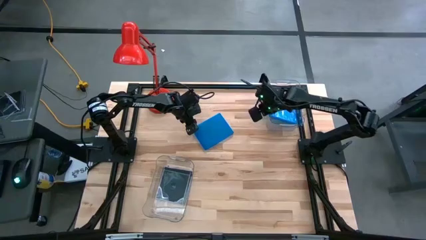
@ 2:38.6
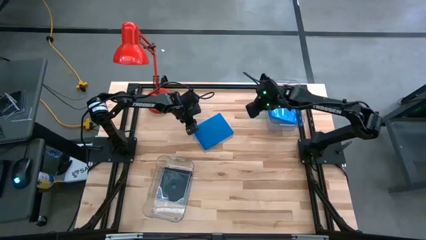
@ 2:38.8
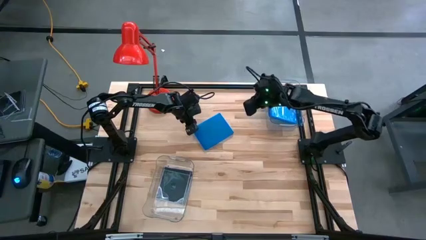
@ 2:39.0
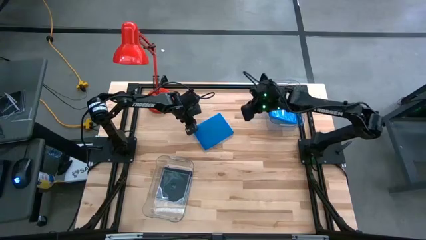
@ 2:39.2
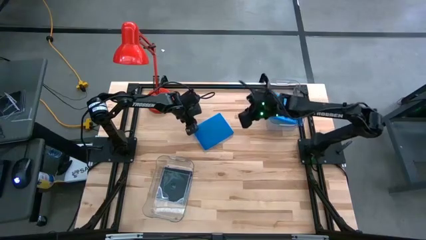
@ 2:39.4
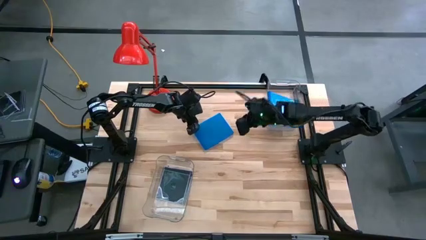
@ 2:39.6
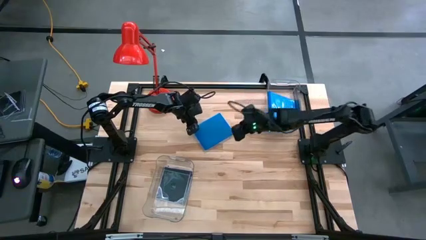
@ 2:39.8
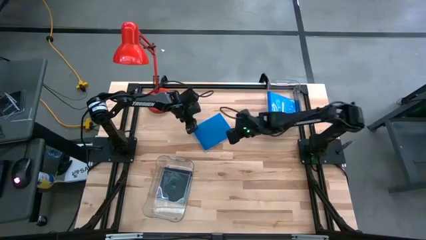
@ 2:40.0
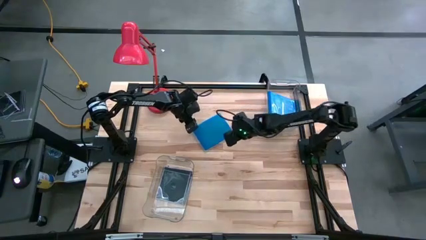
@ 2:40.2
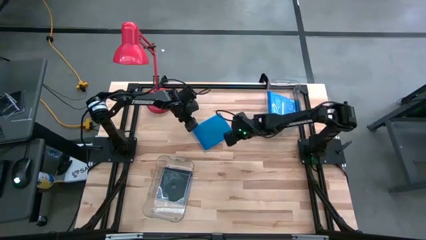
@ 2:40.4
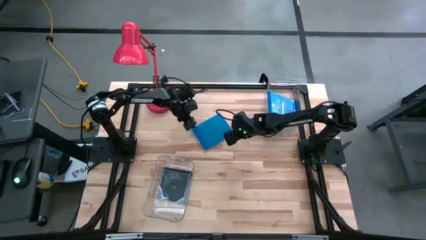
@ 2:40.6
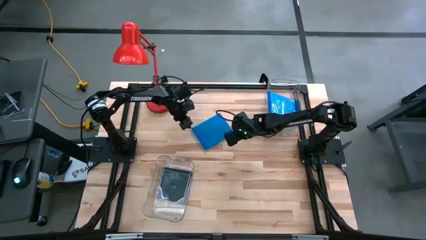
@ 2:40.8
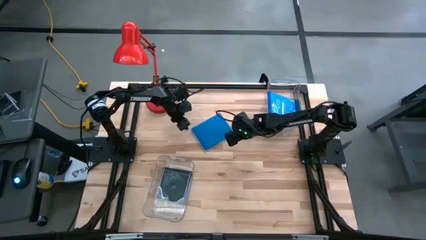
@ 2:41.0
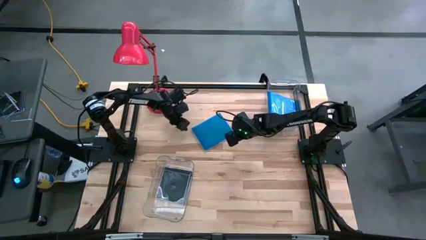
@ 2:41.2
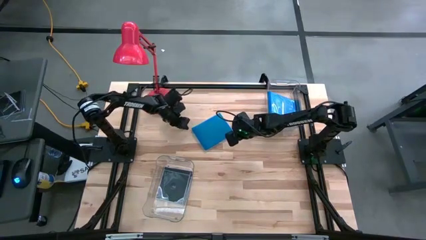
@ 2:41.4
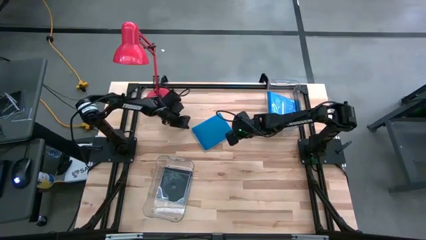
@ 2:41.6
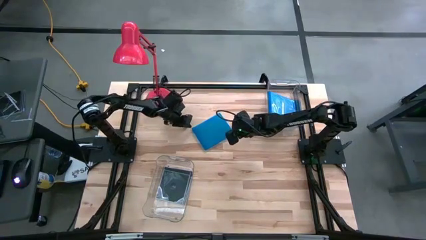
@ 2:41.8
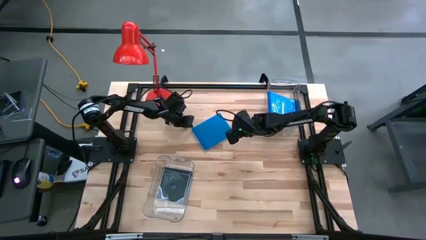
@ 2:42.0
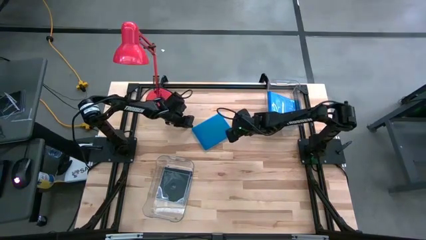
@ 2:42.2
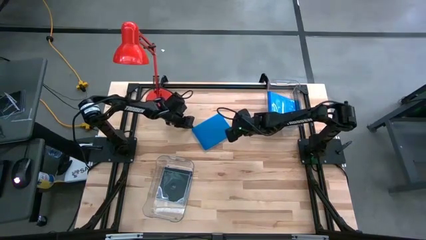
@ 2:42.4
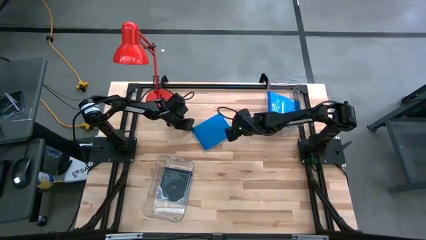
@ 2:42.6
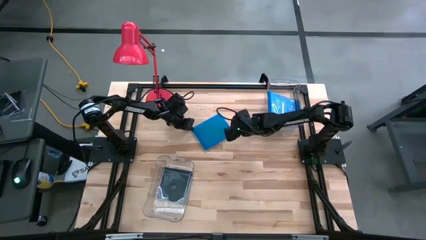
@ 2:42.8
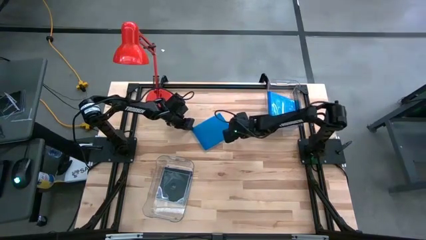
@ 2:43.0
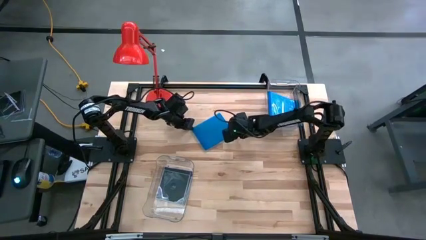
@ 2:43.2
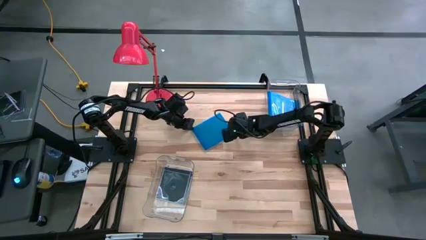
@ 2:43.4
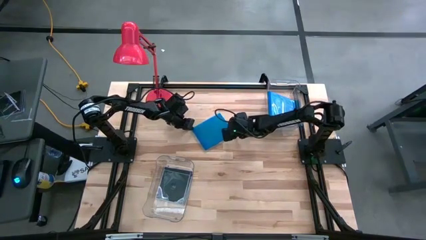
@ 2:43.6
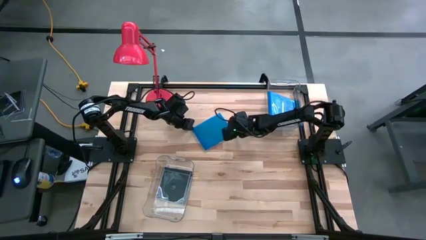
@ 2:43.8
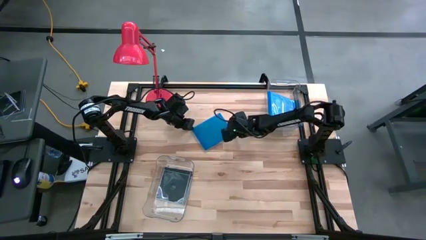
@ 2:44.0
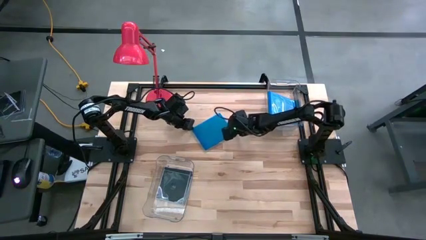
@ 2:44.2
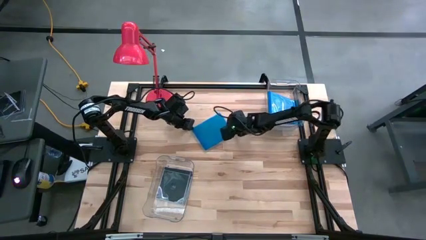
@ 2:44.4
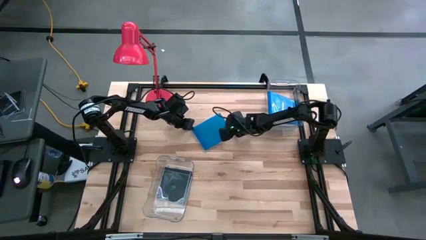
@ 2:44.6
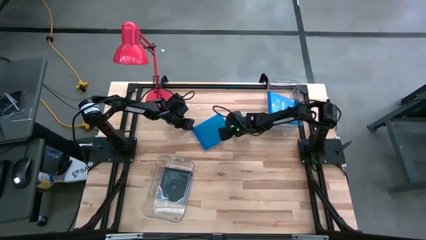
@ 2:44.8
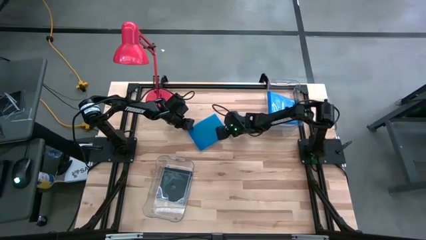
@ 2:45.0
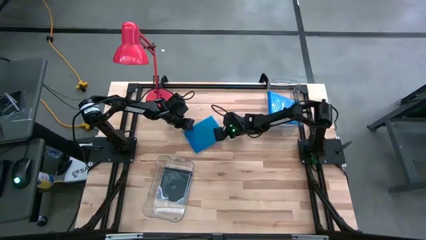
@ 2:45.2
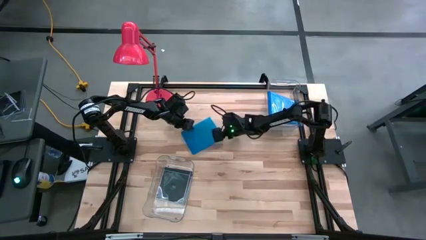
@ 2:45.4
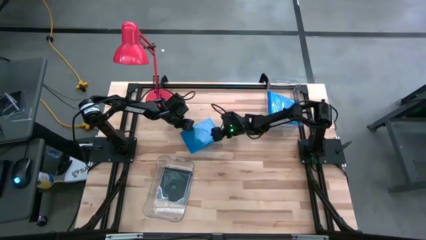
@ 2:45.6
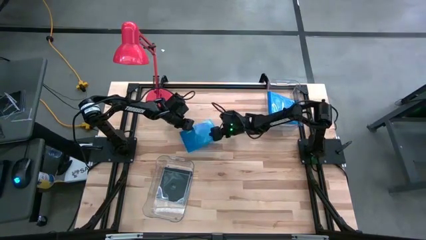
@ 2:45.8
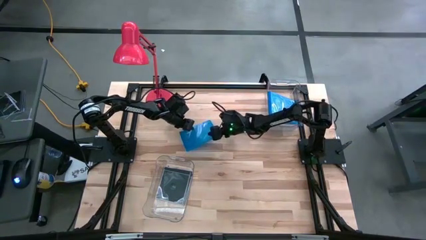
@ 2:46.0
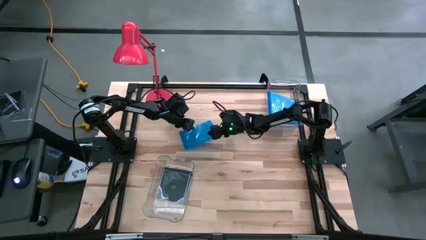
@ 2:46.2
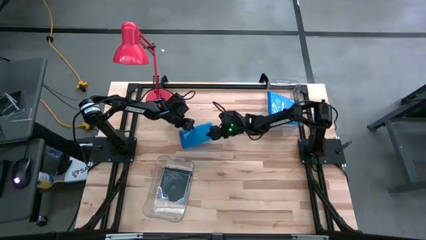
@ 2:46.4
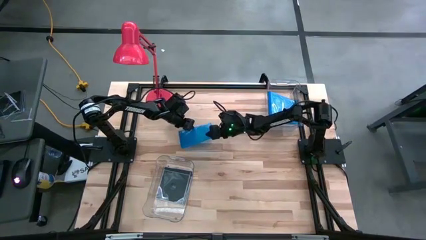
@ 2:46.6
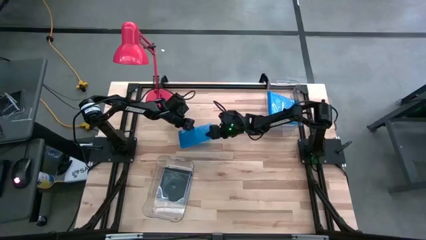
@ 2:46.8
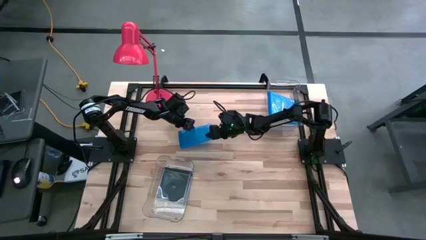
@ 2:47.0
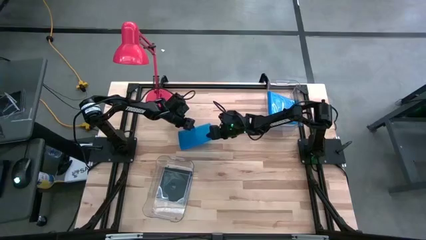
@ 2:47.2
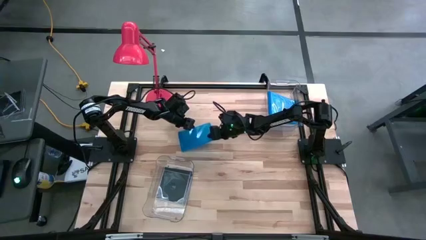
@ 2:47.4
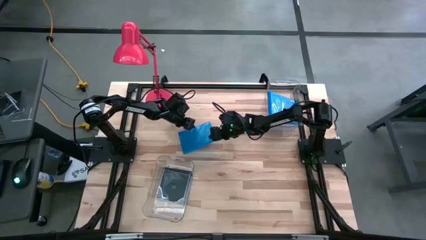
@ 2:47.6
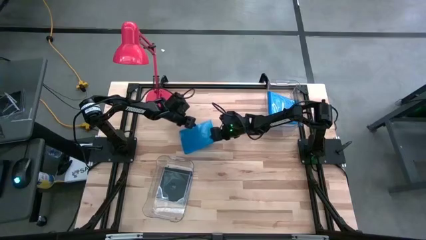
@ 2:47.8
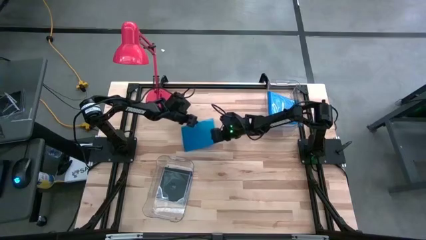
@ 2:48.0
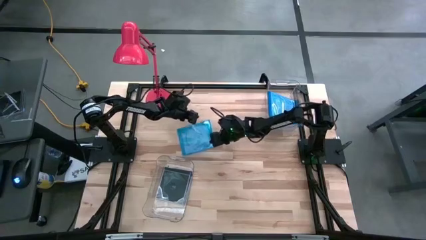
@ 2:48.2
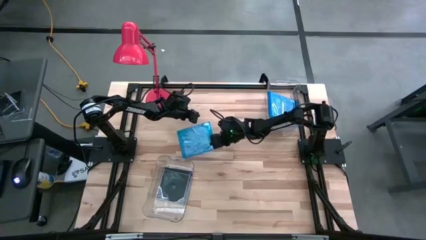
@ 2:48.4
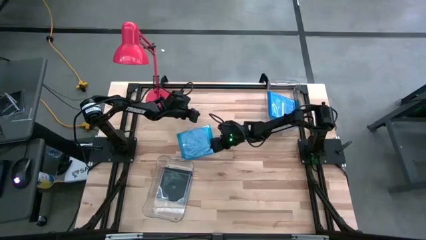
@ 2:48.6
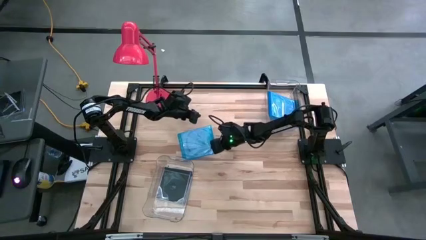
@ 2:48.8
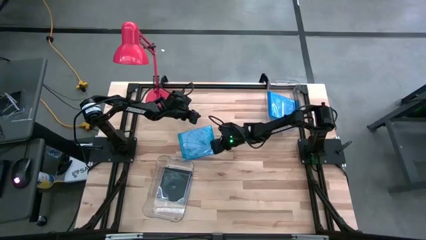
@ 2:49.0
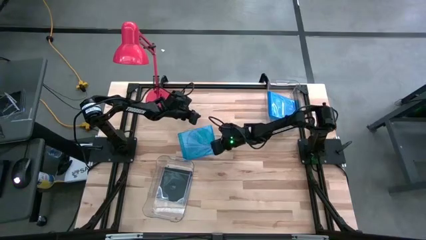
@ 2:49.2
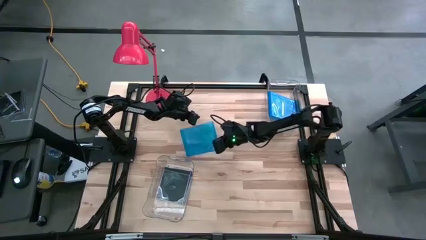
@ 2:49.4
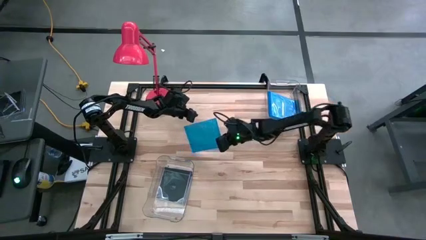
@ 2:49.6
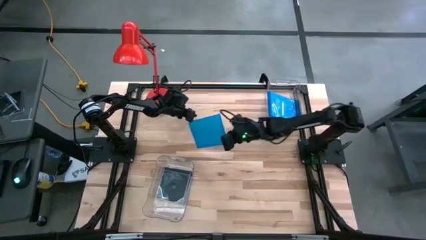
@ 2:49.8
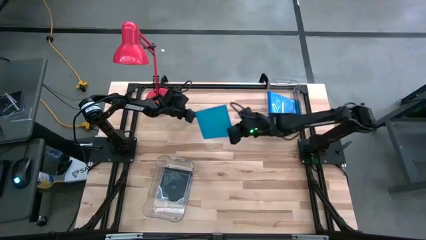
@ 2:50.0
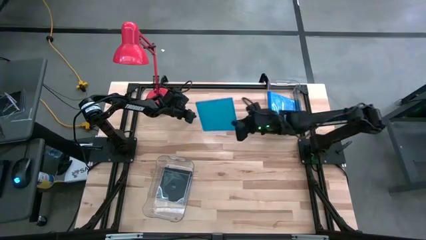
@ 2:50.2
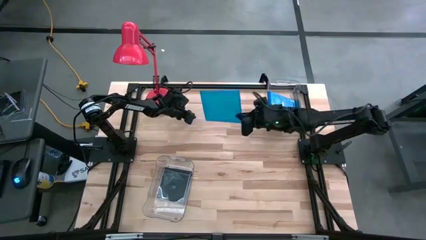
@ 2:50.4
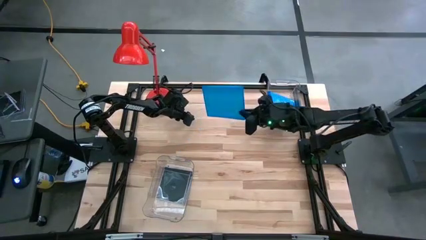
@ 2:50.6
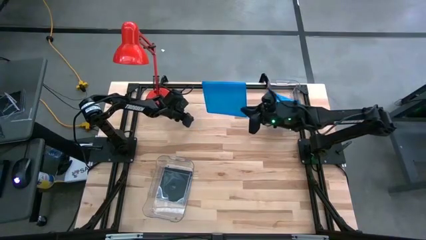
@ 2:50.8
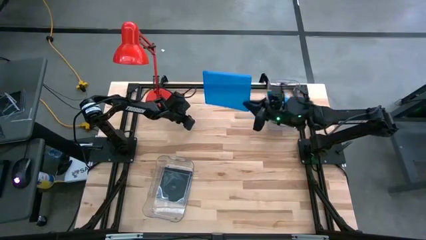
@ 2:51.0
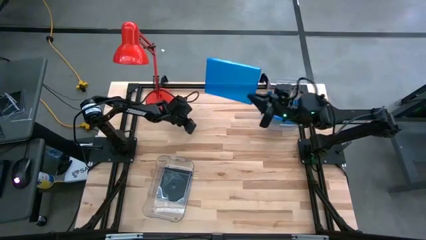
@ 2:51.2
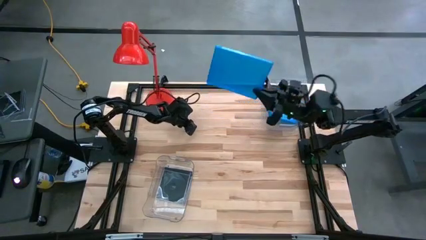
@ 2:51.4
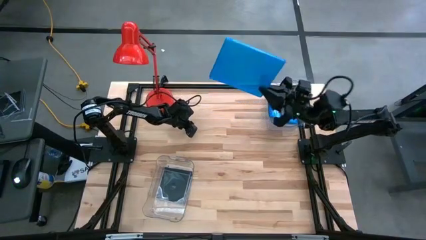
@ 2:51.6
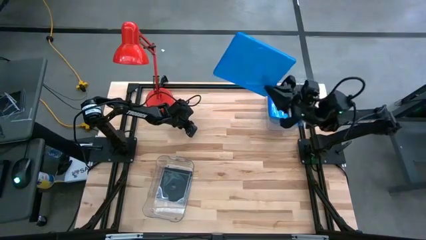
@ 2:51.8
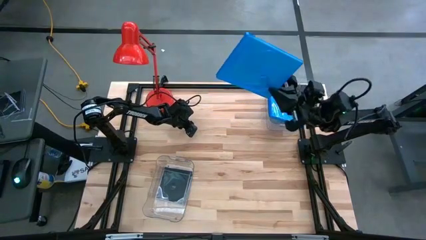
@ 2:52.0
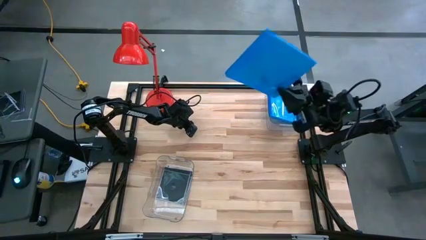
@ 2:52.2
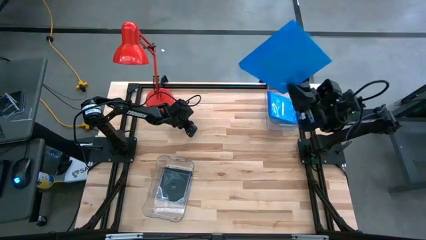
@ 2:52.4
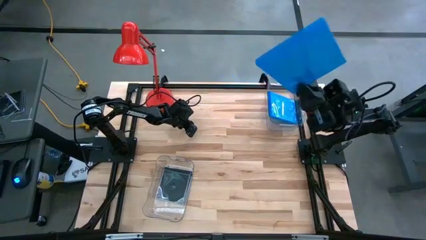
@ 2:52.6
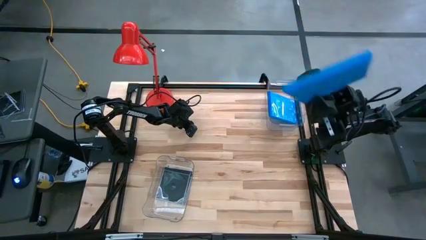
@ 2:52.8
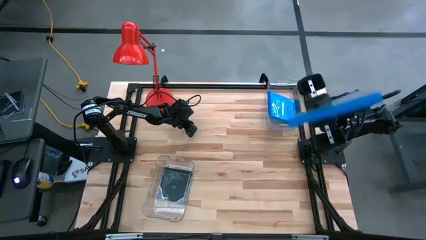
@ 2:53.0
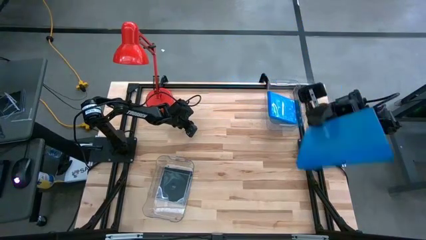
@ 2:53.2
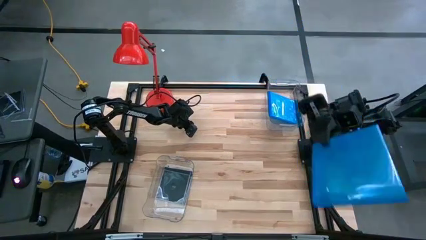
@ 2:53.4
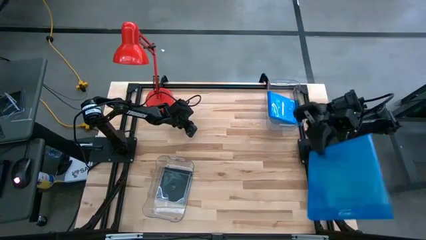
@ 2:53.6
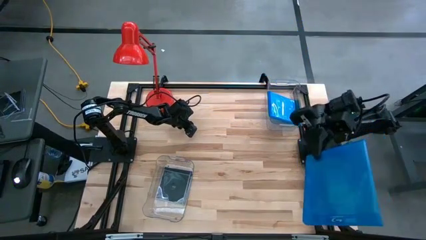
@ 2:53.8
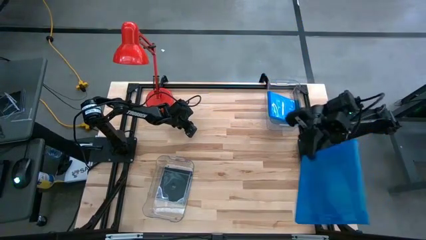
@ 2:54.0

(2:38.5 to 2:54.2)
Task: Pick & place jewel cases by type
Put the blue cd case into the top transparent bin
